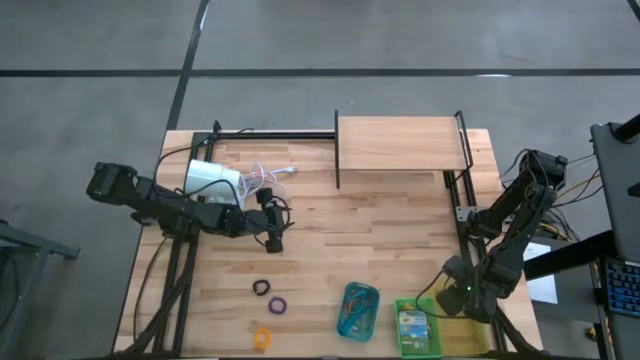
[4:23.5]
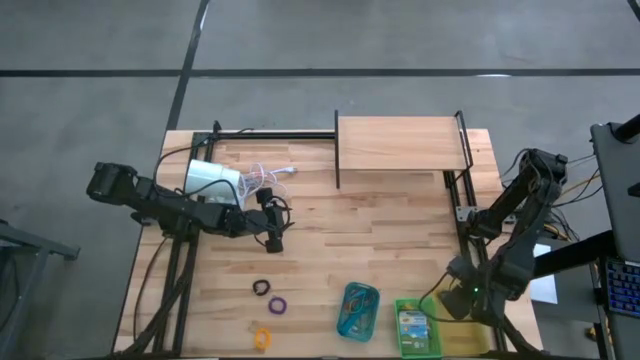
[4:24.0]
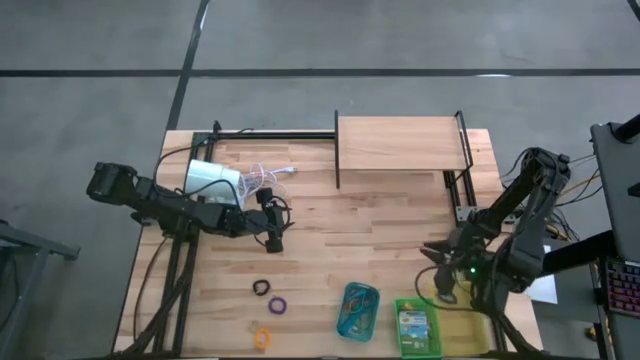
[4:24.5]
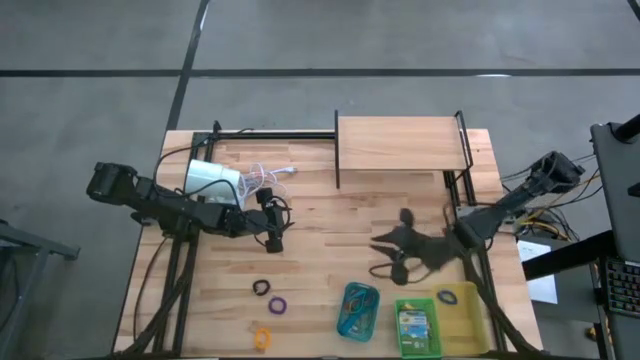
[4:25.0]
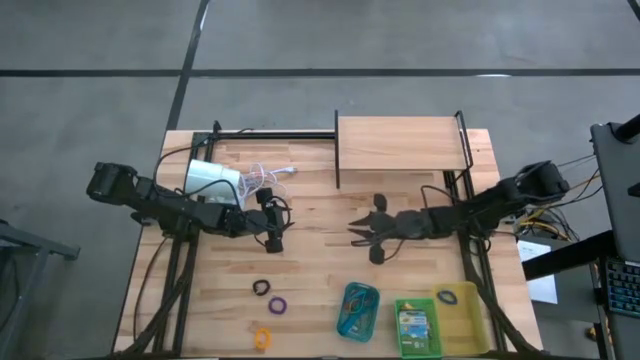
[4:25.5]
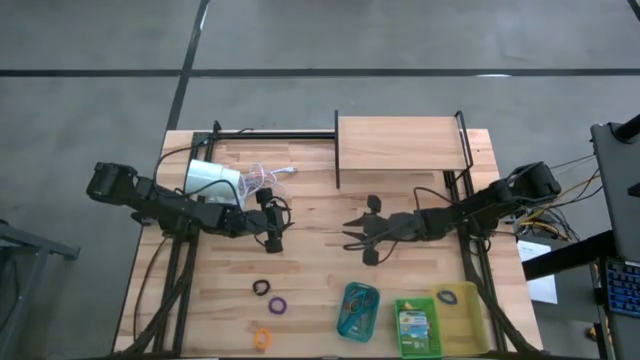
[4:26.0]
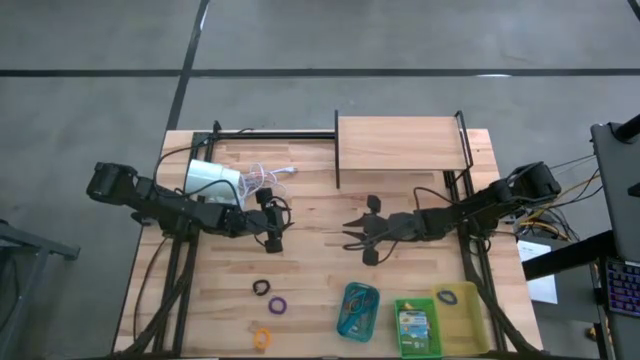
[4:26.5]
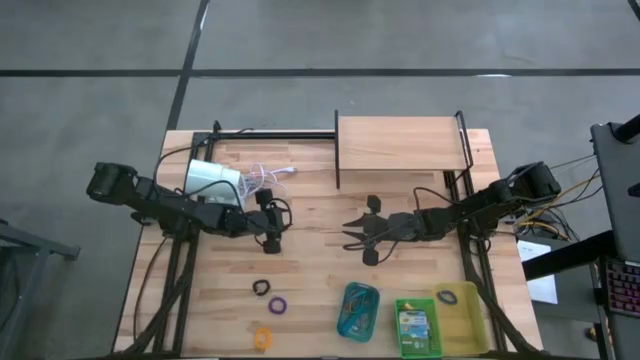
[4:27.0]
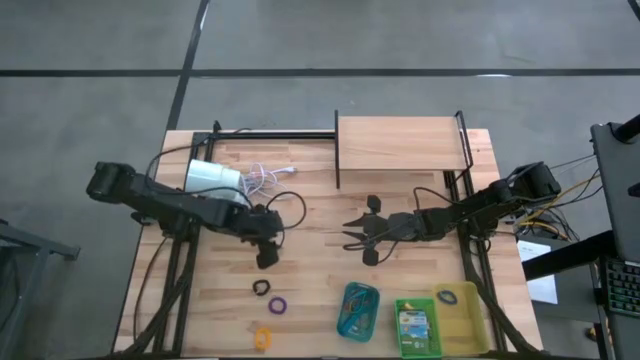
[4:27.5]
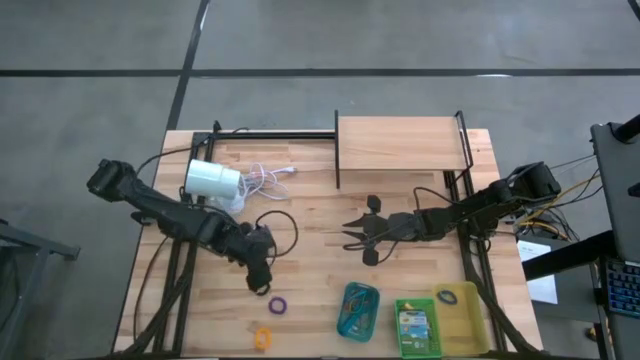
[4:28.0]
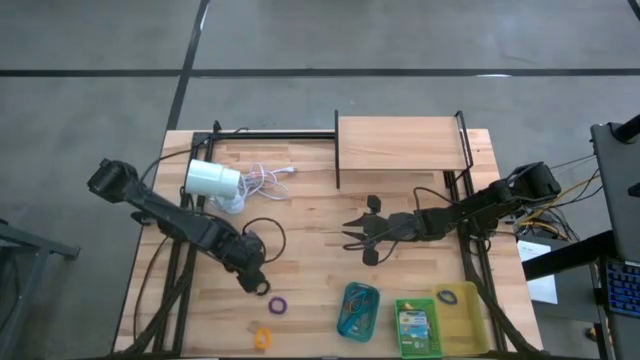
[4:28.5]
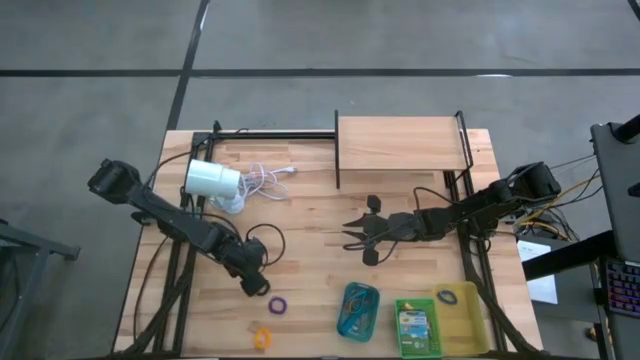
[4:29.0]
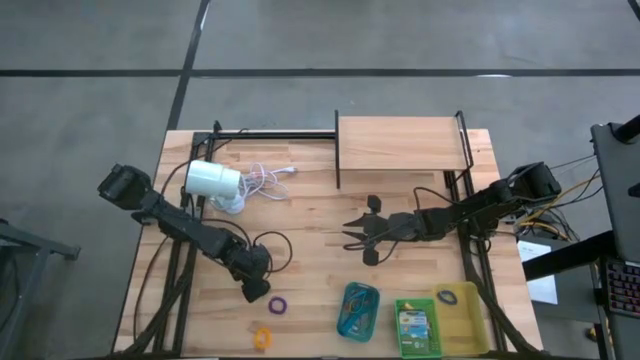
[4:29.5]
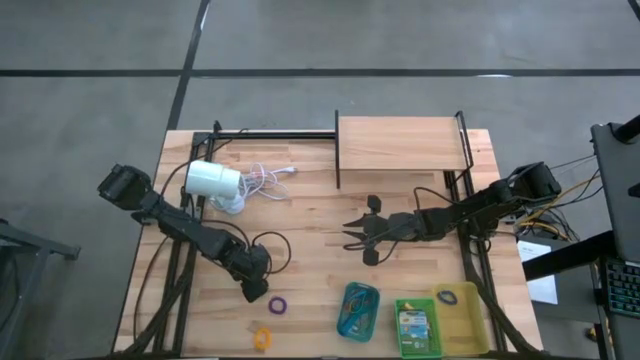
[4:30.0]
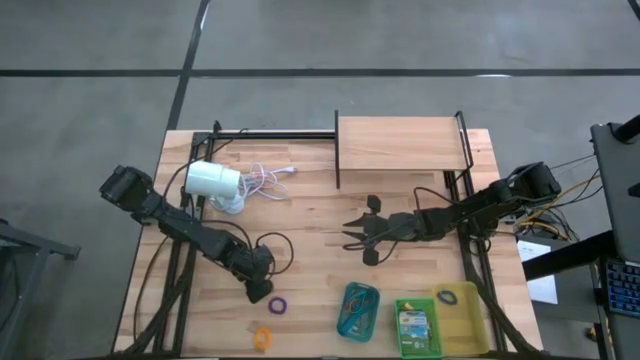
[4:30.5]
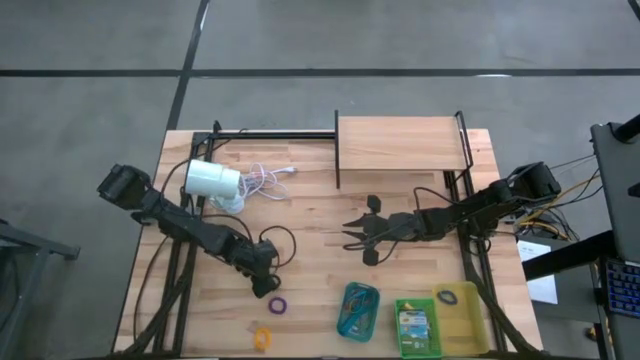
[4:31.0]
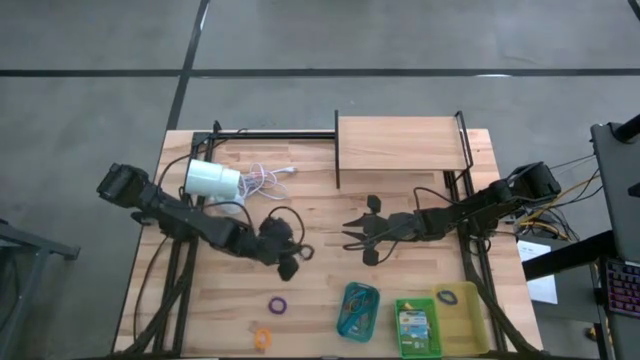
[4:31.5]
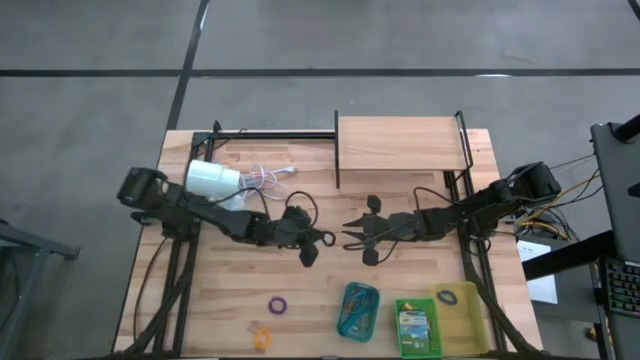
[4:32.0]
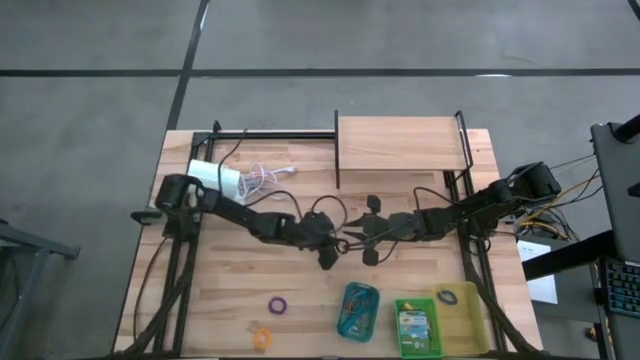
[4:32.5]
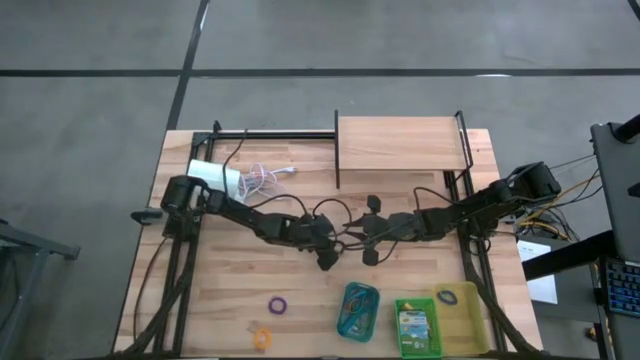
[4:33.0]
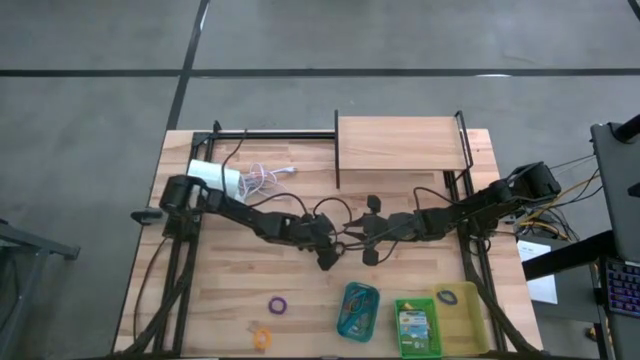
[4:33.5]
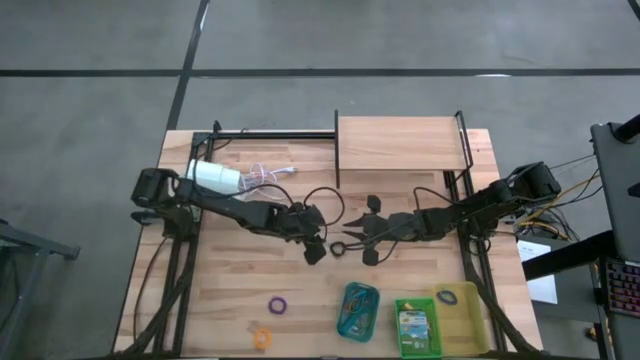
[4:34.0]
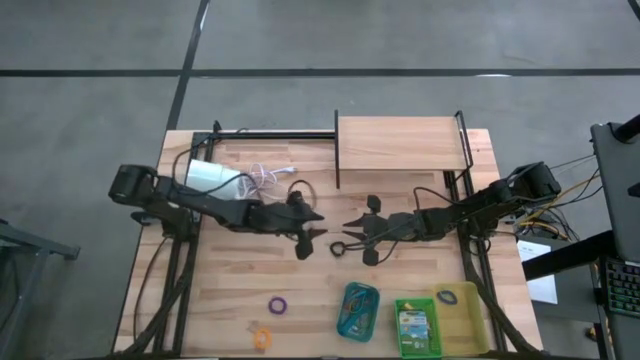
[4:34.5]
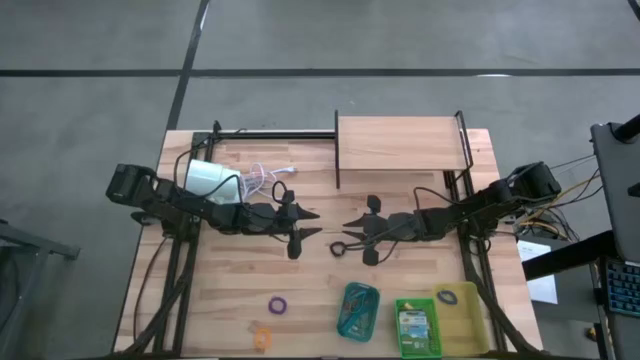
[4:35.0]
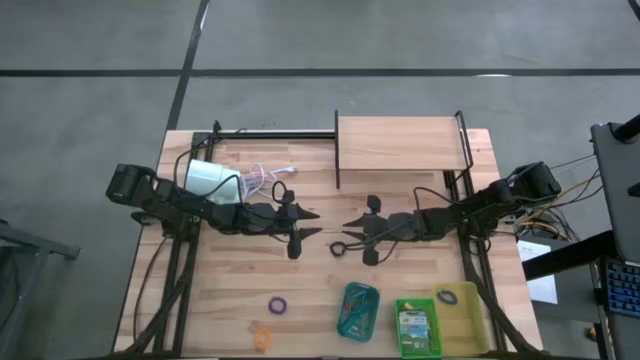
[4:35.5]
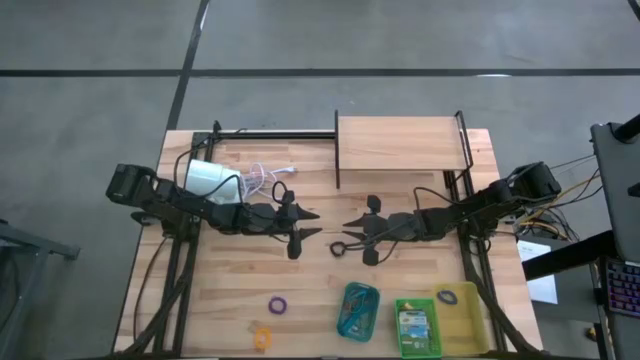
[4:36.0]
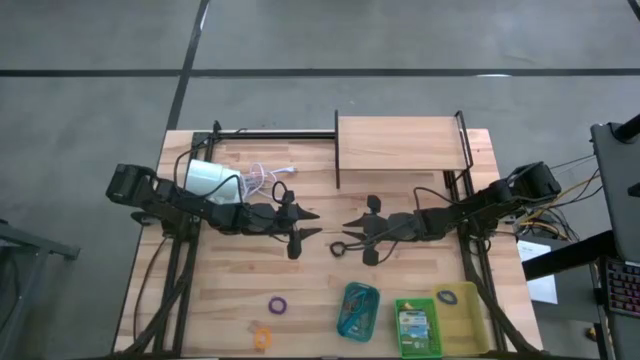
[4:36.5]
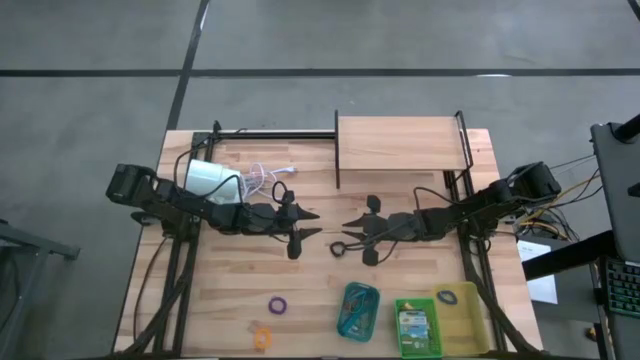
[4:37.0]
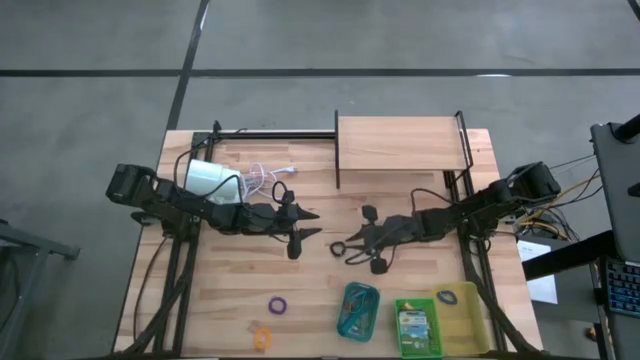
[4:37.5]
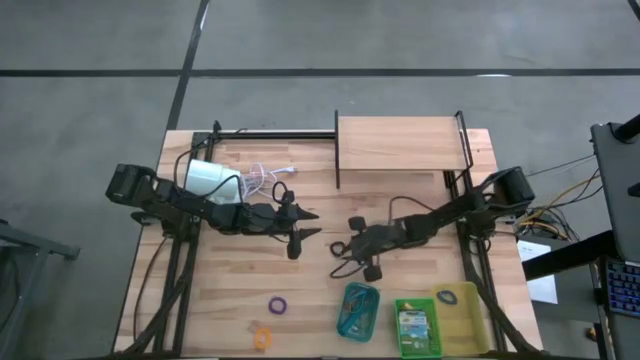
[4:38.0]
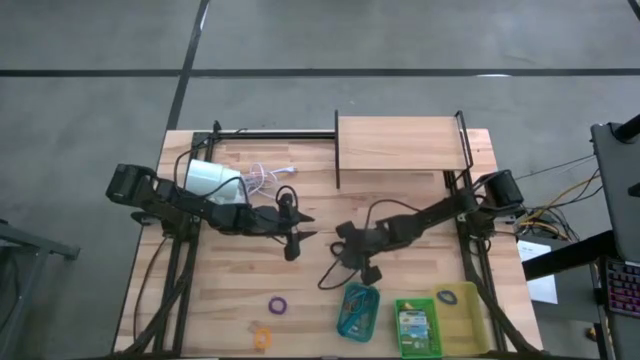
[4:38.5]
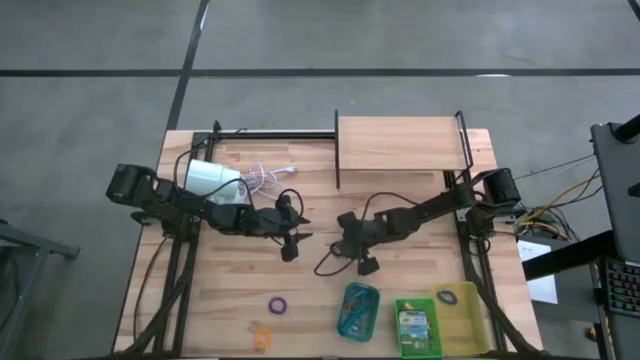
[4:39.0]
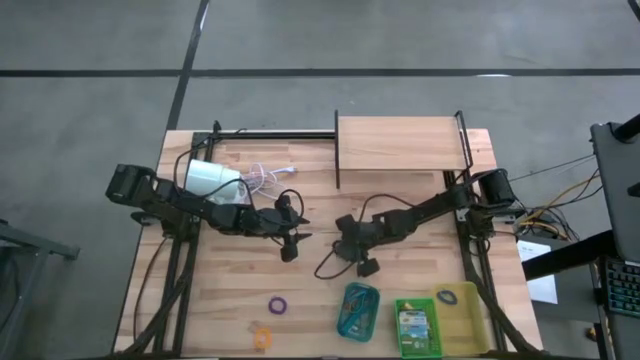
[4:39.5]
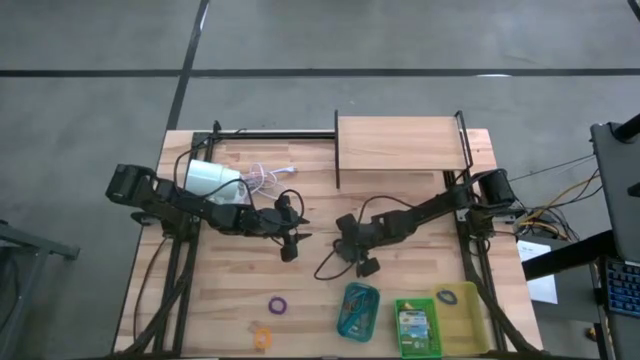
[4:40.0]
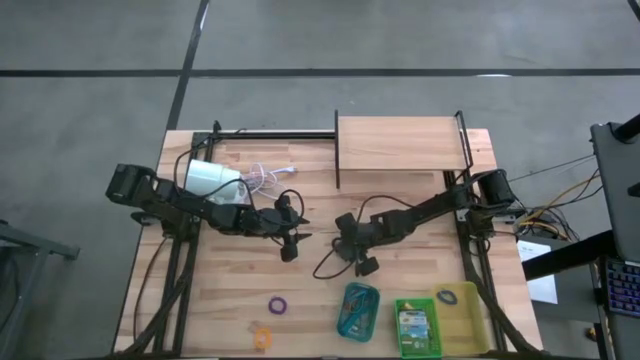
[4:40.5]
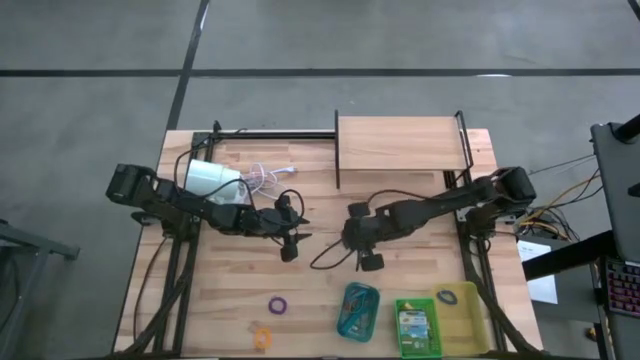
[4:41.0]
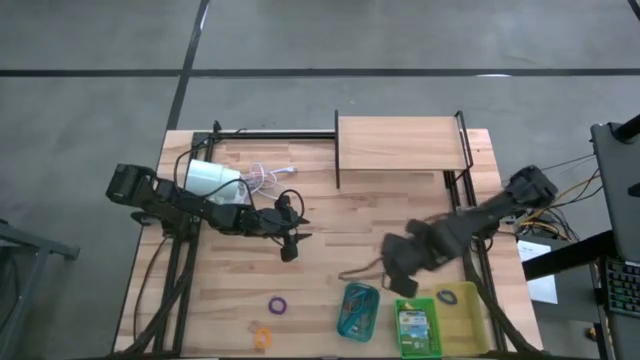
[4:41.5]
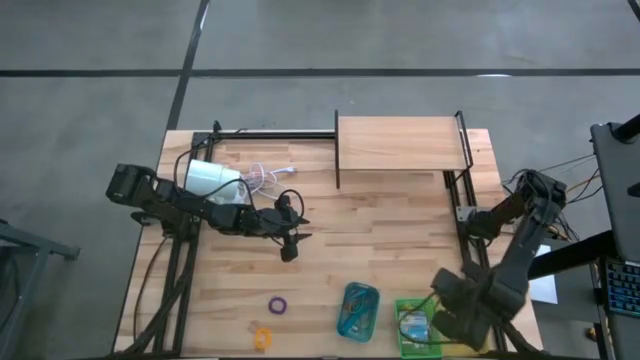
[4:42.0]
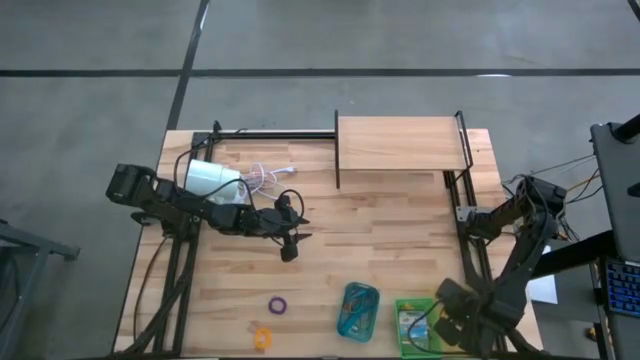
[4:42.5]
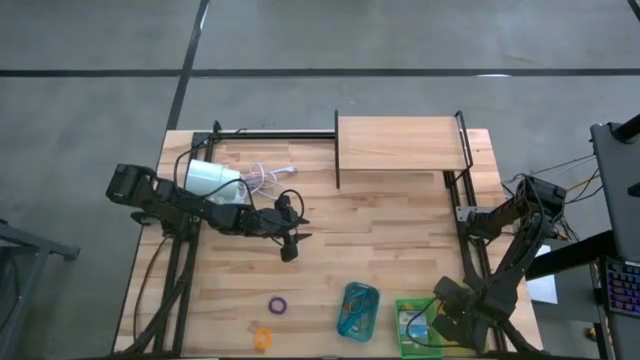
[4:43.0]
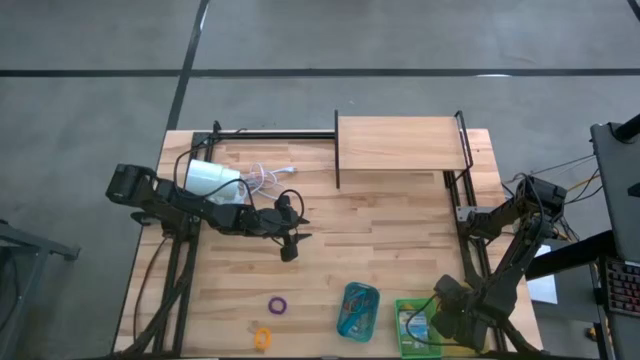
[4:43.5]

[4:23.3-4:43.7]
Task: Pick & Place Office Desk Supplies
Put the black spring rubberband into the yellow bin

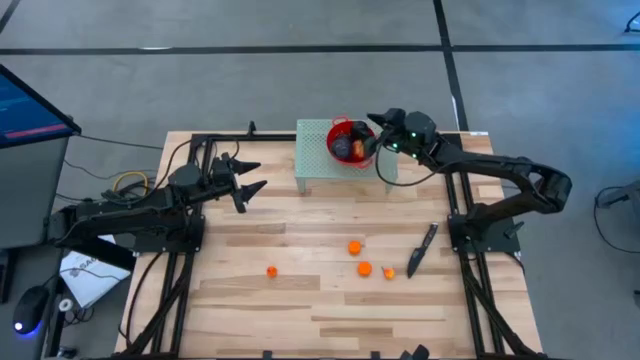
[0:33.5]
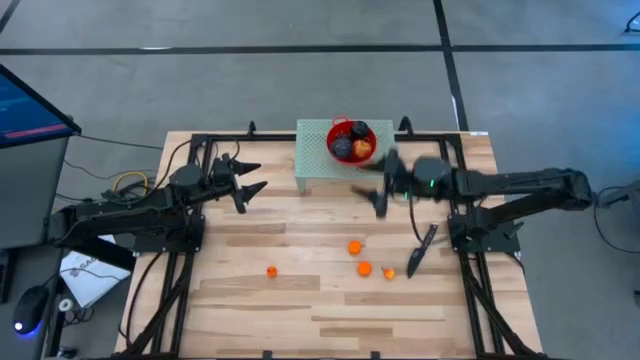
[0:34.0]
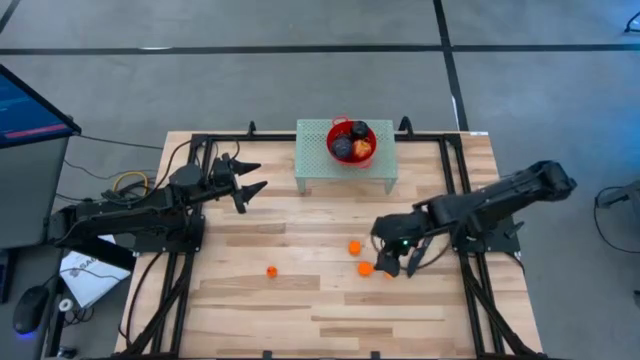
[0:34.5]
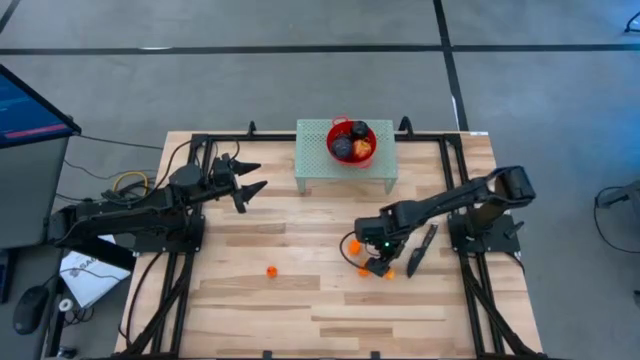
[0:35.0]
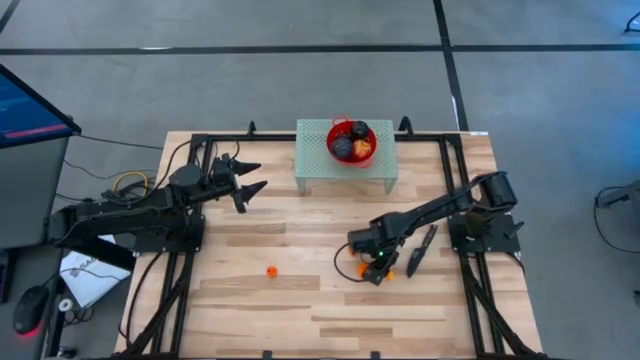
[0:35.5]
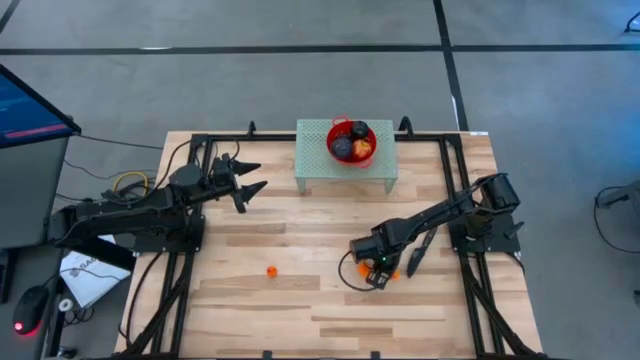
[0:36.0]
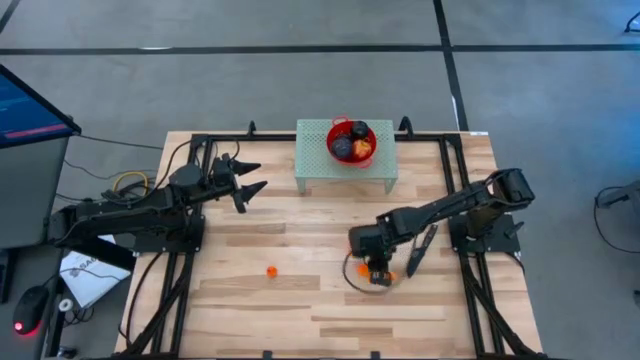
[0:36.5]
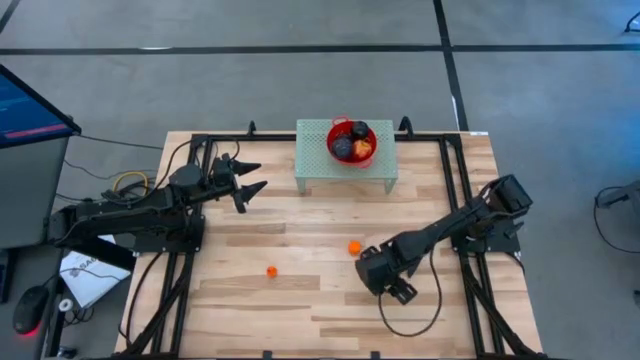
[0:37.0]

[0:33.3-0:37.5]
Task: Pick & Place Fruit
Put the right orange pear into the red strainer bowl on the shelf
